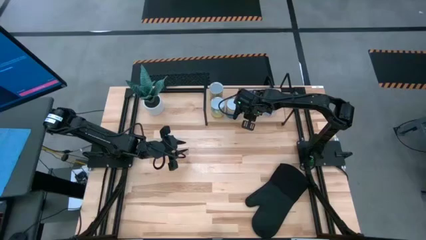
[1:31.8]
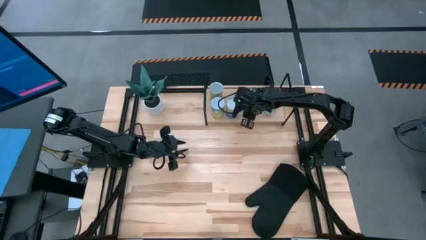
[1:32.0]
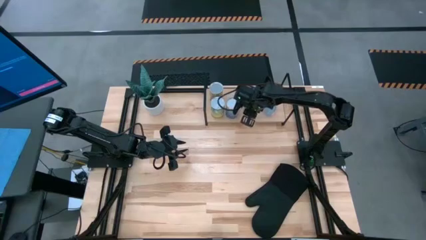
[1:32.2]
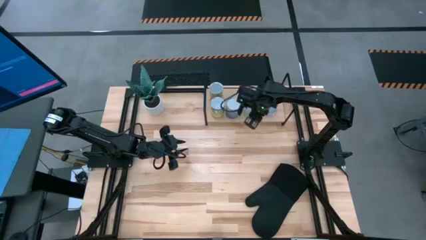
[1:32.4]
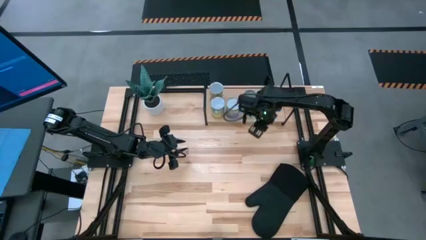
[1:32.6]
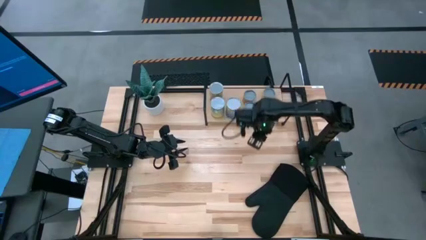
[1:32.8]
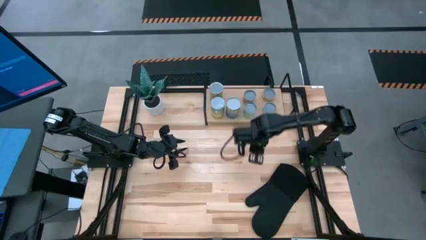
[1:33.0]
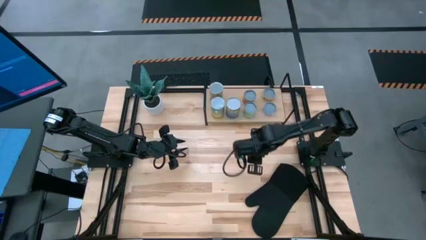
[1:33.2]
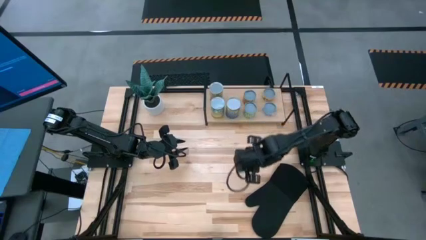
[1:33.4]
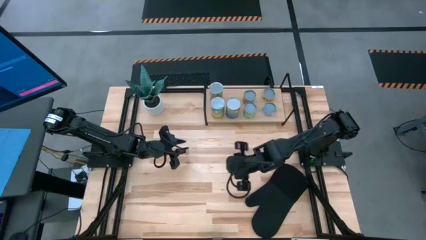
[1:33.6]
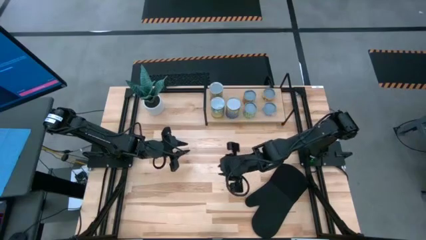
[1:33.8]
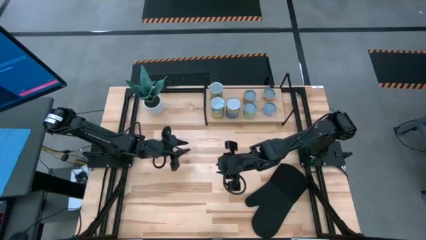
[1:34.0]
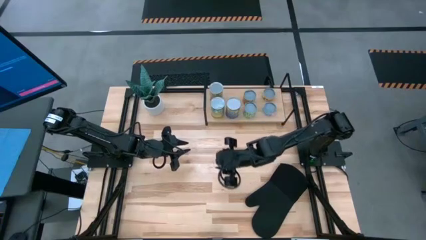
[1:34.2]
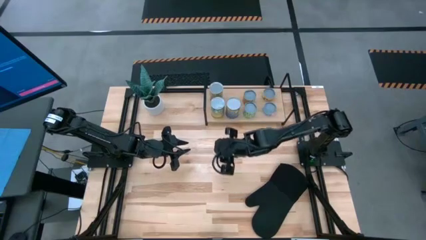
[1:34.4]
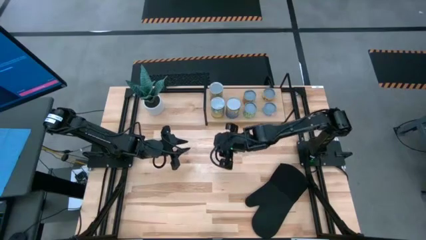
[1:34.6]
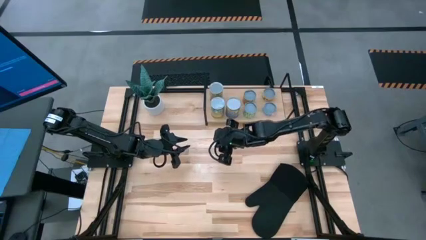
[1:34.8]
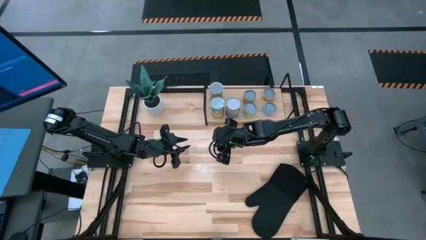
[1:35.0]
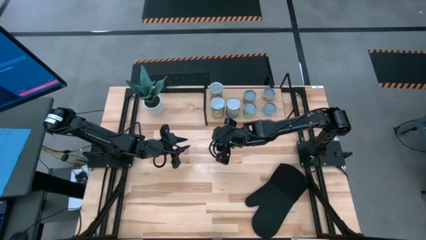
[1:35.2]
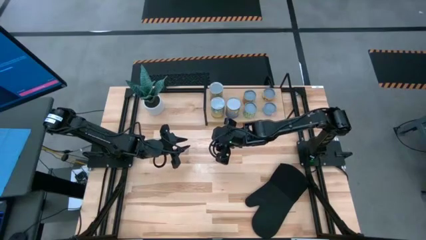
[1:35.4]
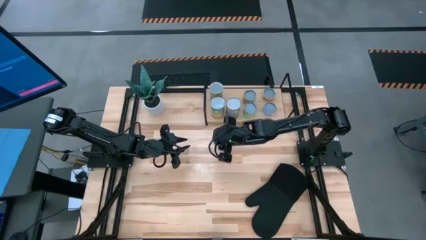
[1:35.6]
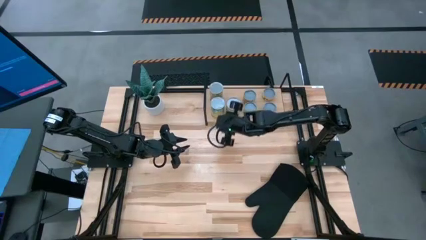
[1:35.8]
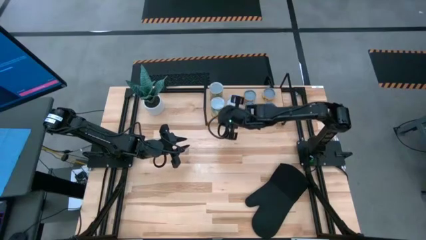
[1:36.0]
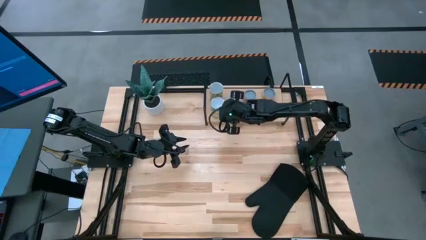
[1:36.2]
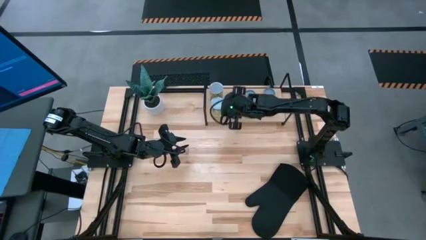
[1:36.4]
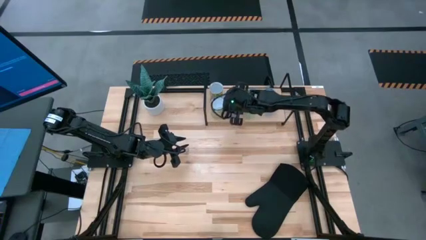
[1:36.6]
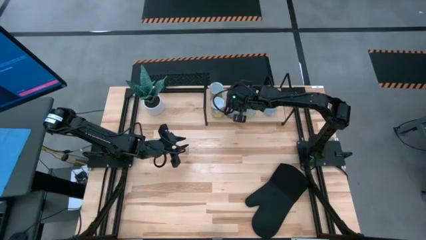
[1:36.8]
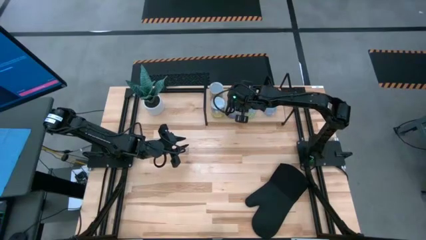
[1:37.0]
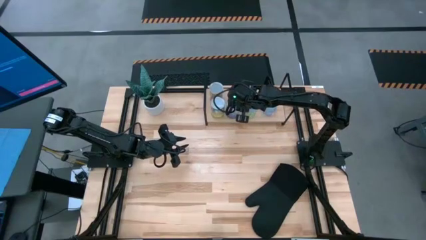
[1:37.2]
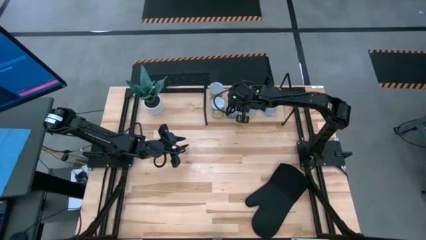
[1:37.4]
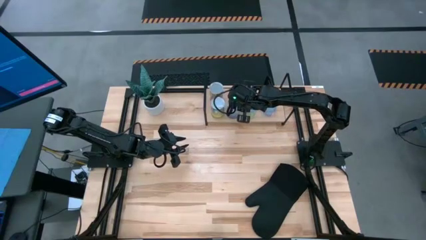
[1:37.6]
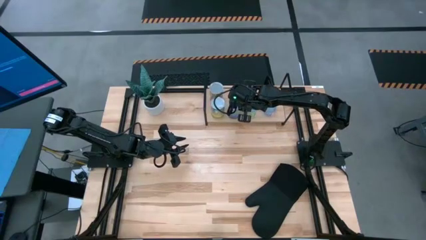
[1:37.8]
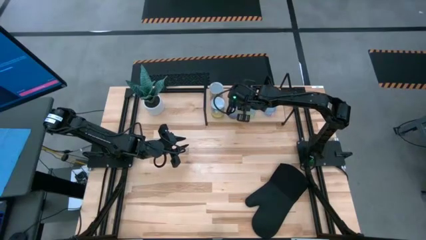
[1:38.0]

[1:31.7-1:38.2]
Task: Pick and place cans onto a shelf
Adjust the canned peas on the shelf

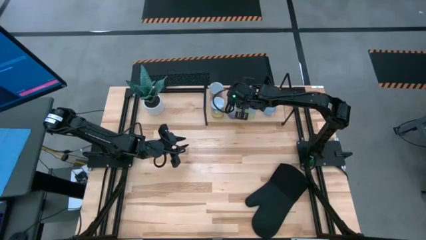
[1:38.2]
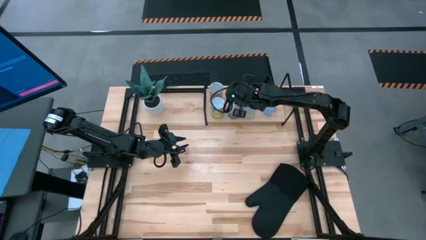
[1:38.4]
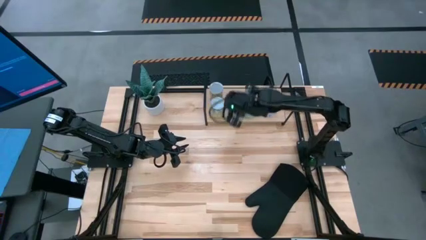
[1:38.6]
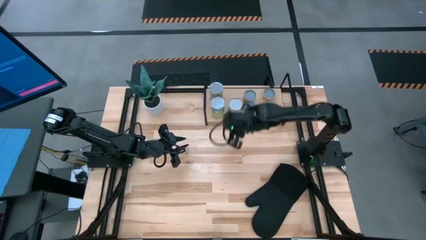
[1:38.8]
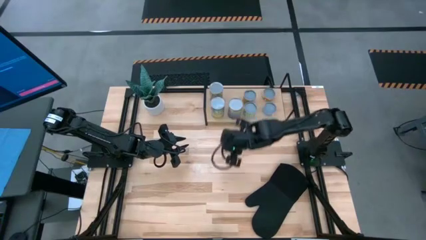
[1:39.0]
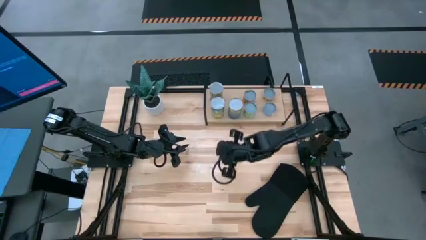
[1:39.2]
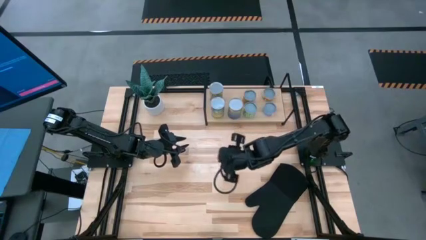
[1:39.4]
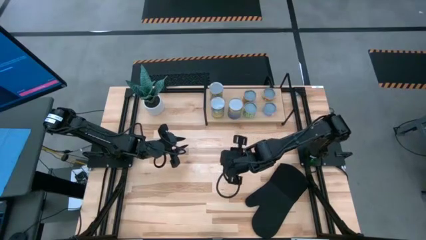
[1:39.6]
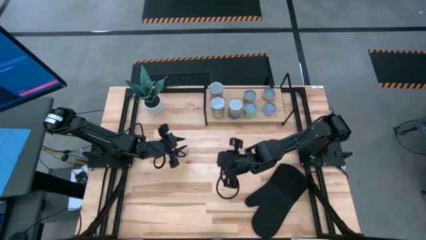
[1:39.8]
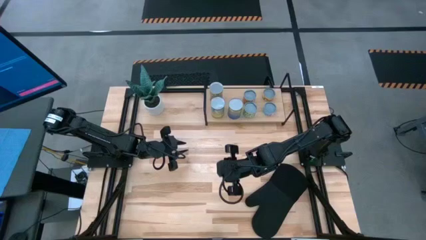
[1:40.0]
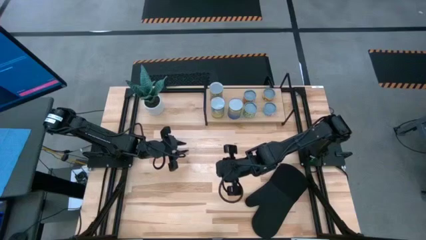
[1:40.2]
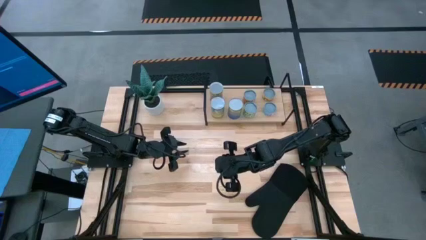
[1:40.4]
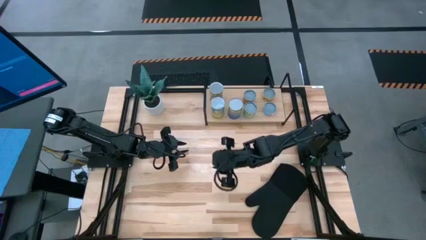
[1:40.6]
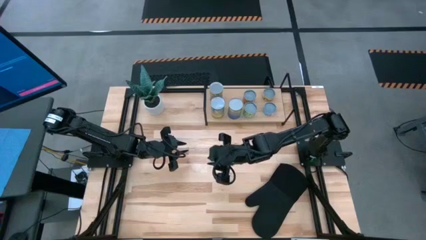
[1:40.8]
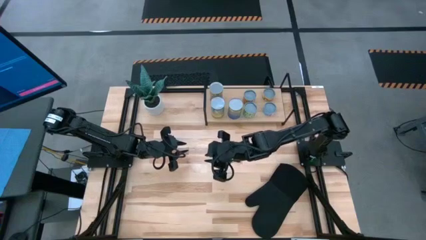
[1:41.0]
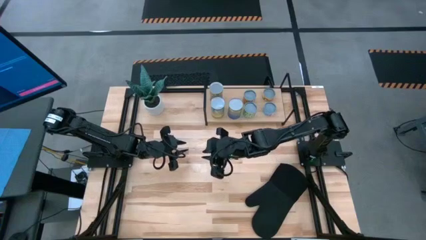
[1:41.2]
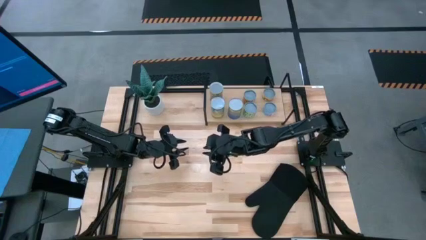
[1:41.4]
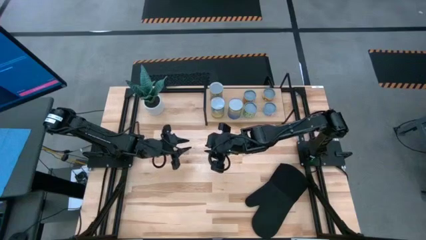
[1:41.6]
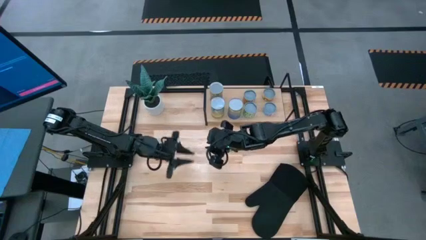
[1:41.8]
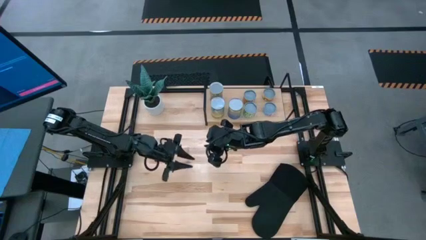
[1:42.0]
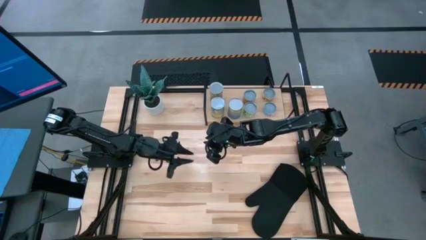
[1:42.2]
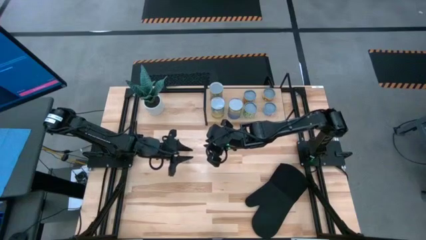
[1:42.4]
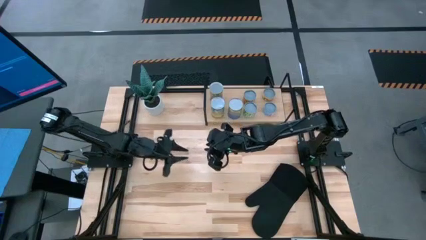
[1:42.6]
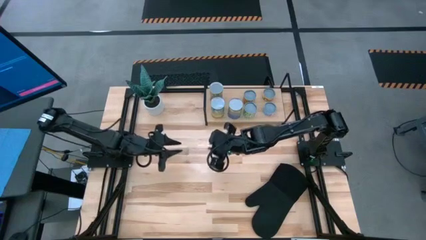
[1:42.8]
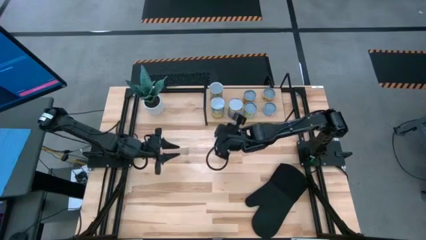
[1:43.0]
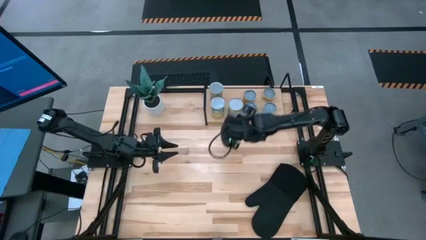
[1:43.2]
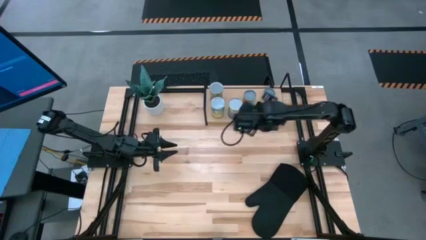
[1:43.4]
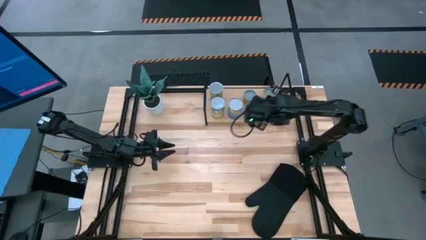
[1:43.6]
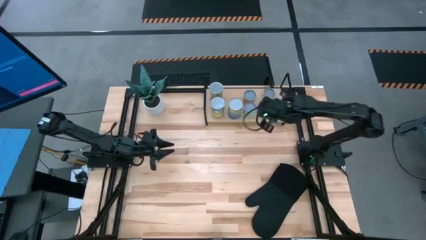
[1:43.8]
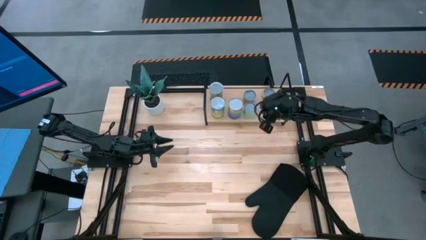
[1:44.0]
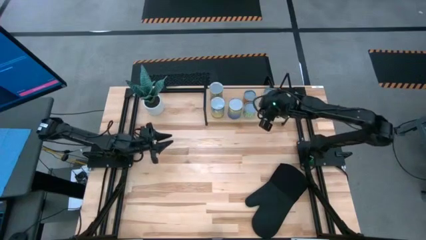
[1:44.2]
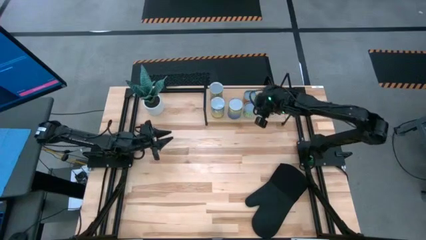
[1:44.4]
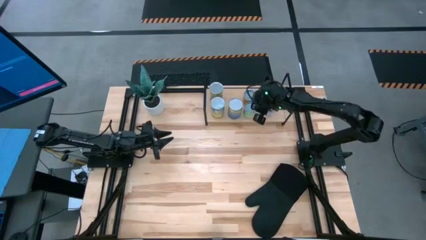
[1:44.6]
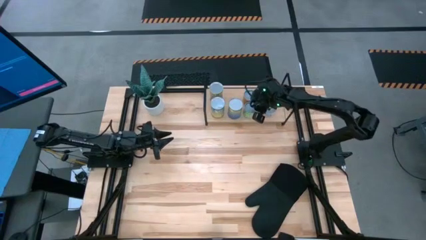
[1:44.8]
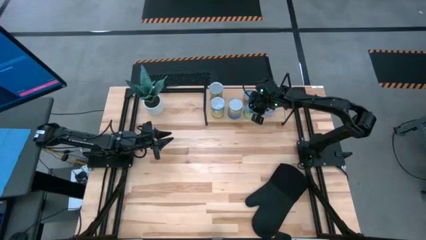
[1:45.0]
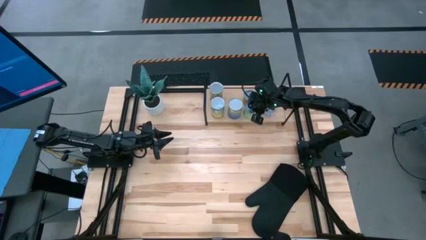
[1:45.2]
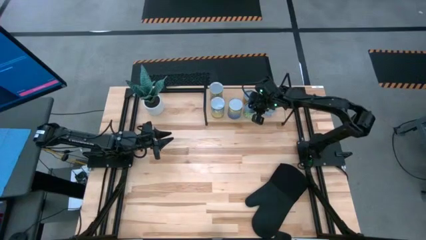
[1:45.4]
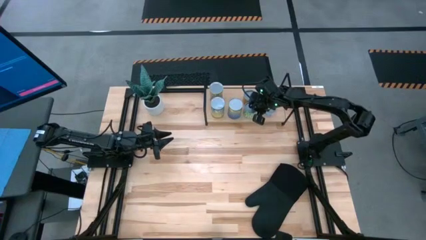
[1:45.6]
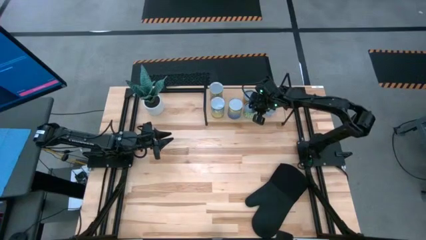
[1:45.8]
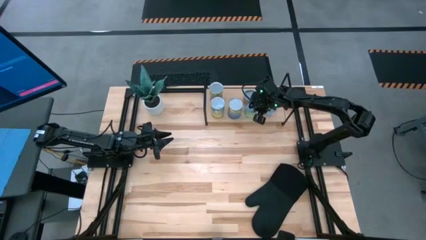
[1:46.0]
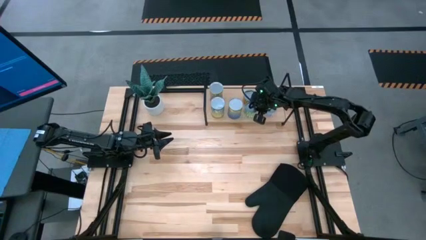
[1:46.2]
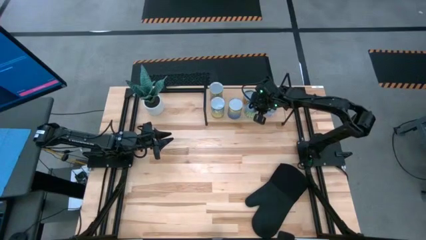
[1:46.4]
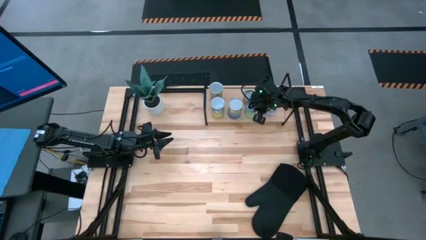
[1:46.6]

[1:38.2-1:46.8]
Adjust the canned green peas on the shelf

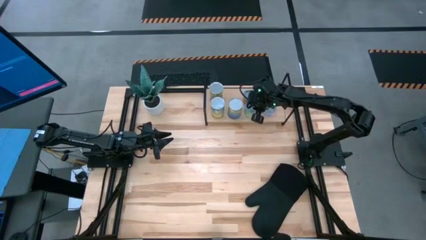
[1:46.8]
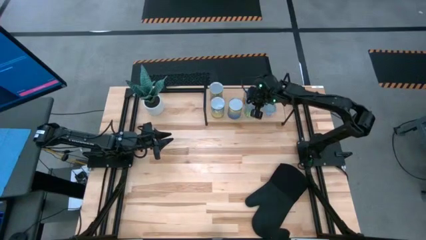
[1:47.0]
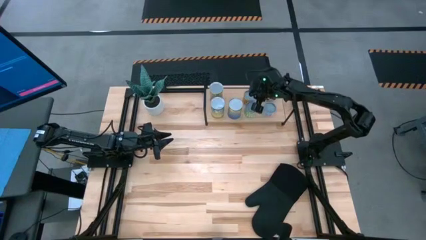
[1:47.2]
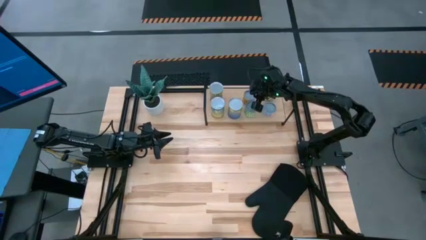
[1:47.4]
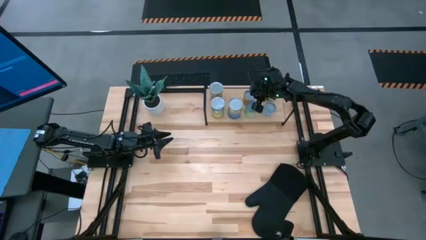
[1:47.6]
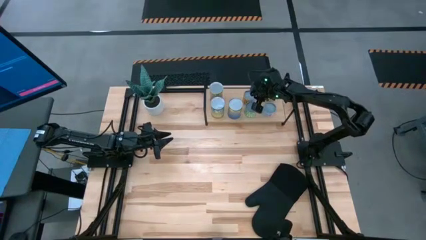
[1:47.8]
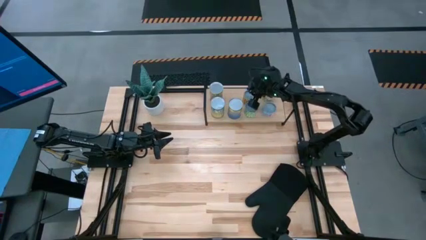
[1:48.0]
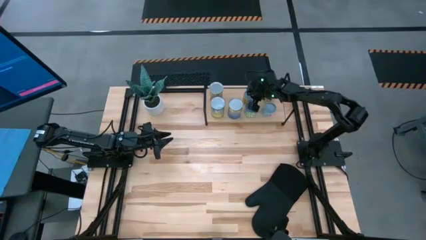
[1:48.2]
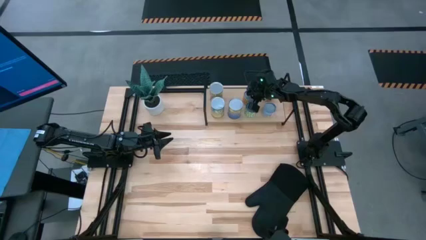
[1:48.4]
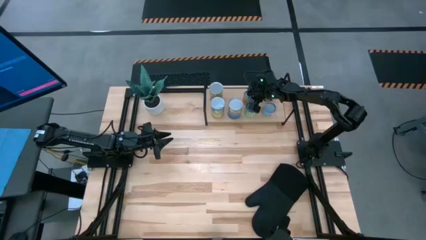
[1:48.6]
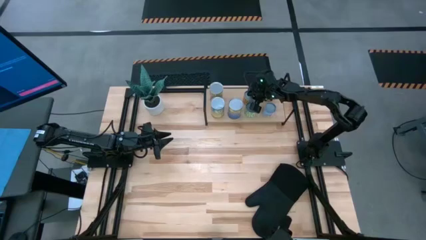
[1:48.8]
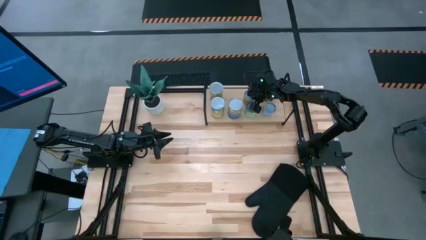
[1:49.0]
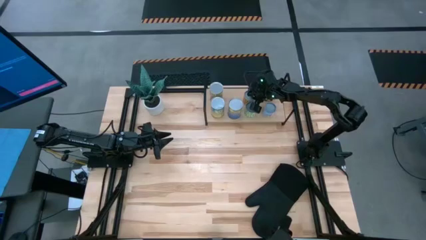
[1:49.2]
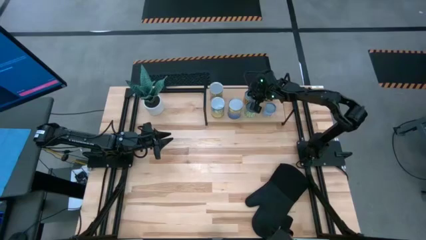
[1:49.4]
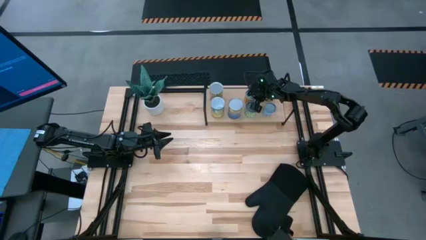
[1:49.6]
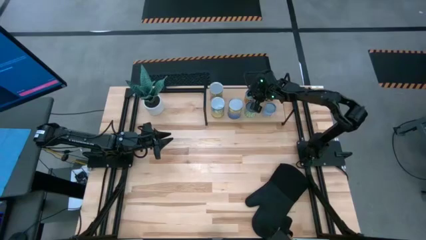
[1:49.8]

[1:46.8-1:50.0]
Adjust the canned black beans on the shelf
